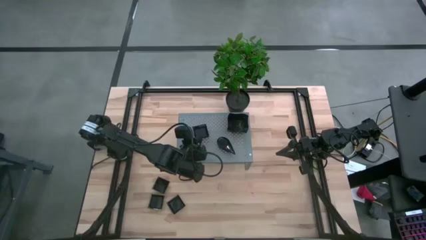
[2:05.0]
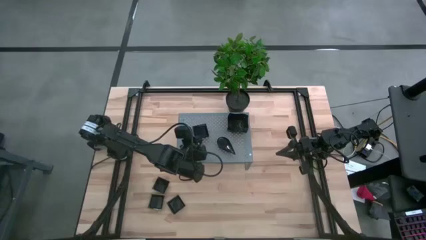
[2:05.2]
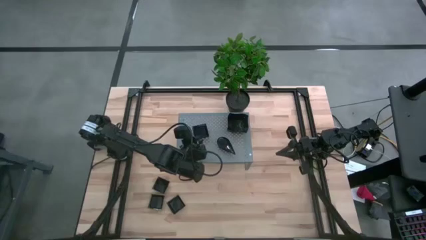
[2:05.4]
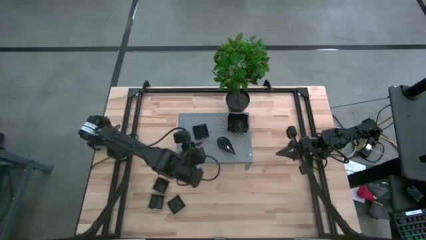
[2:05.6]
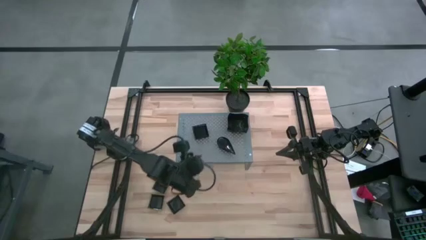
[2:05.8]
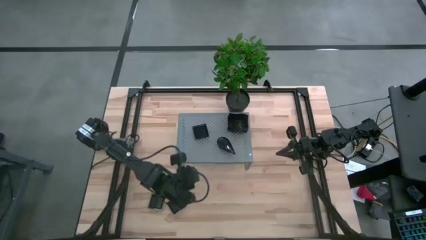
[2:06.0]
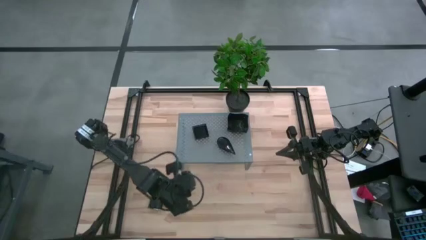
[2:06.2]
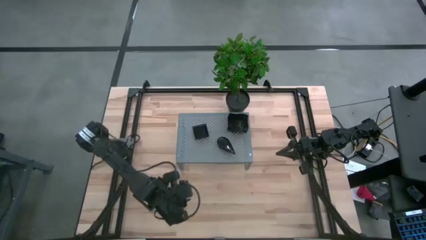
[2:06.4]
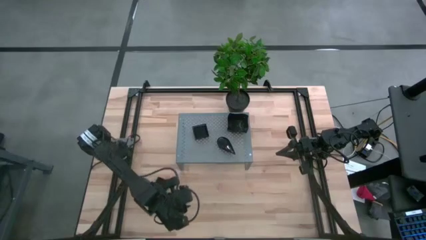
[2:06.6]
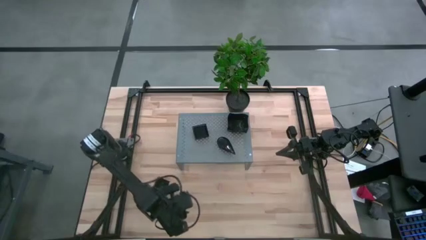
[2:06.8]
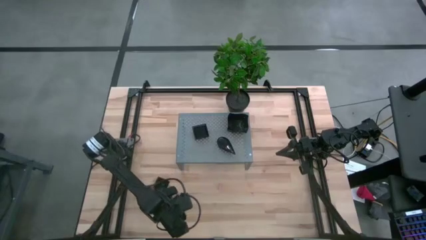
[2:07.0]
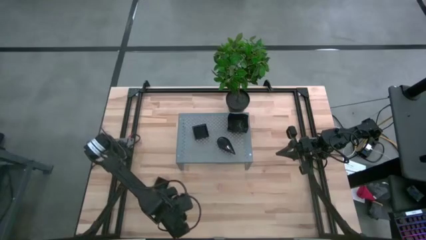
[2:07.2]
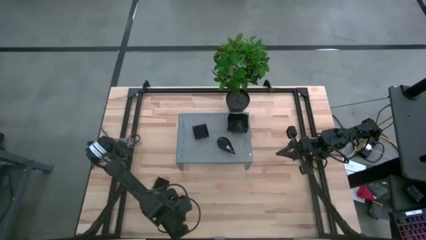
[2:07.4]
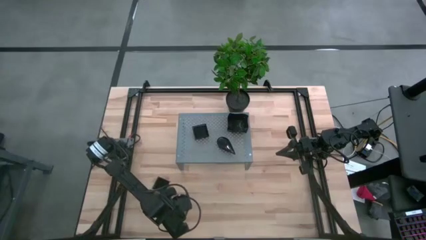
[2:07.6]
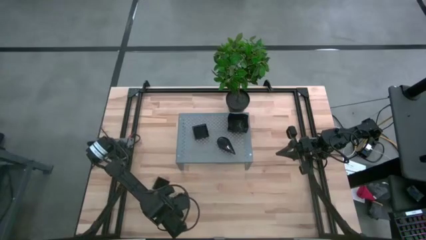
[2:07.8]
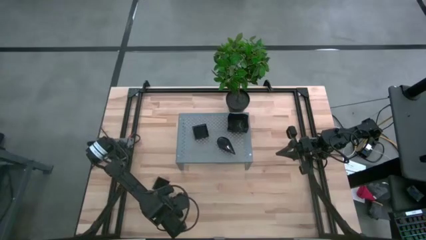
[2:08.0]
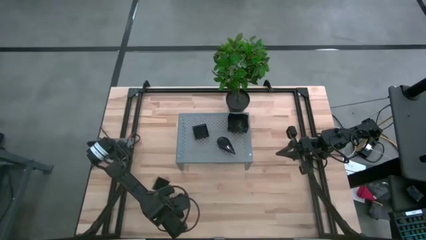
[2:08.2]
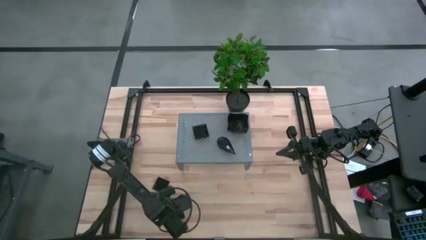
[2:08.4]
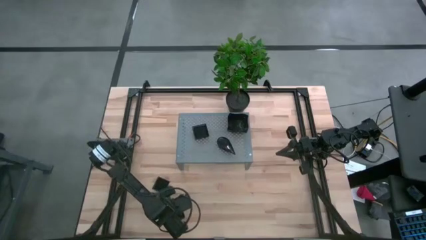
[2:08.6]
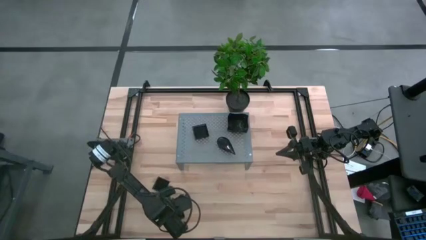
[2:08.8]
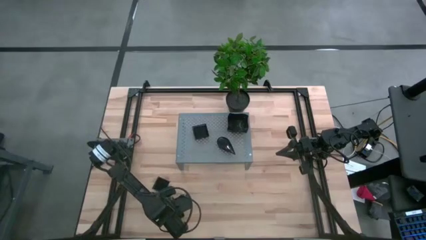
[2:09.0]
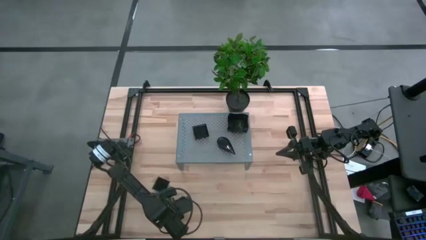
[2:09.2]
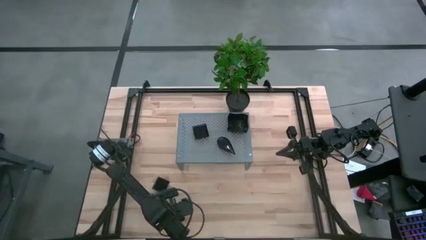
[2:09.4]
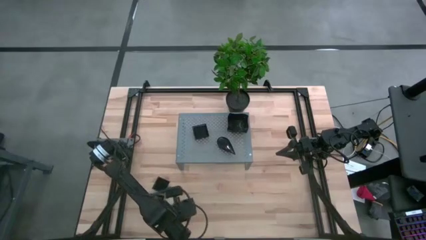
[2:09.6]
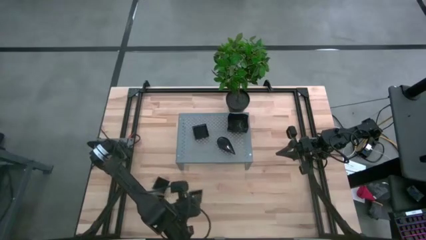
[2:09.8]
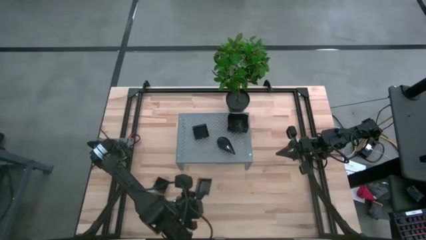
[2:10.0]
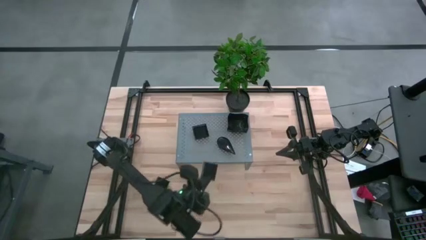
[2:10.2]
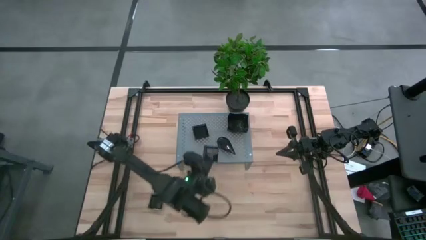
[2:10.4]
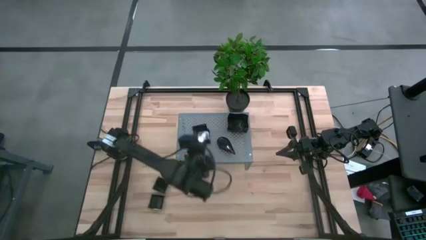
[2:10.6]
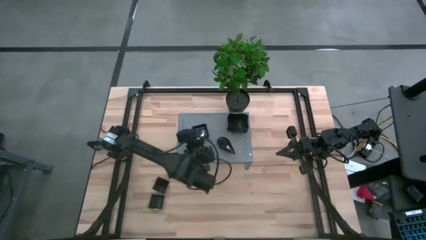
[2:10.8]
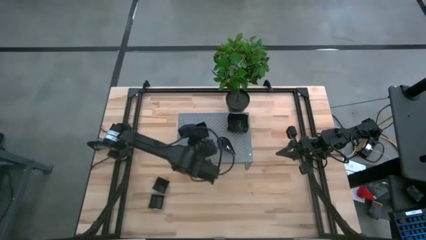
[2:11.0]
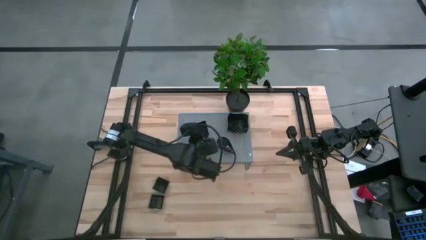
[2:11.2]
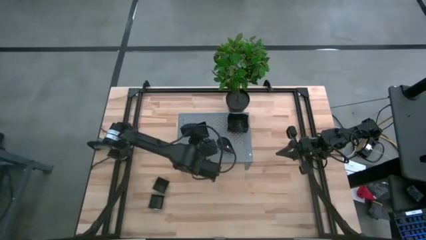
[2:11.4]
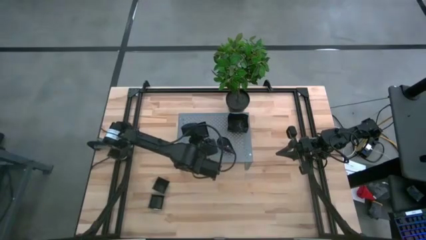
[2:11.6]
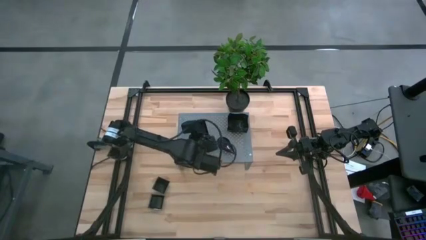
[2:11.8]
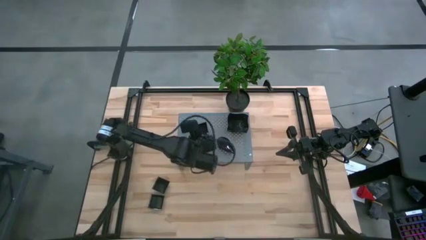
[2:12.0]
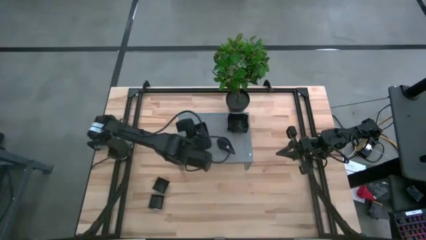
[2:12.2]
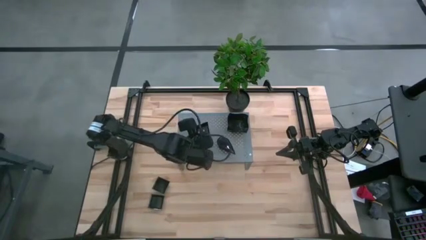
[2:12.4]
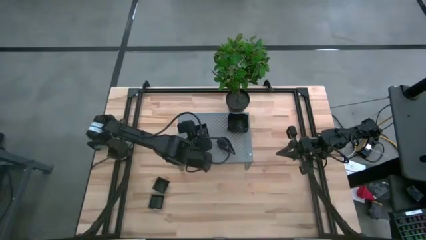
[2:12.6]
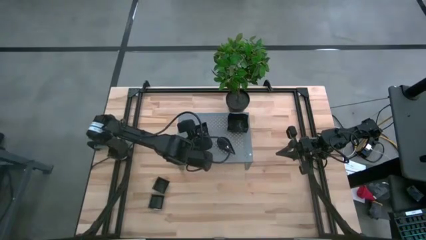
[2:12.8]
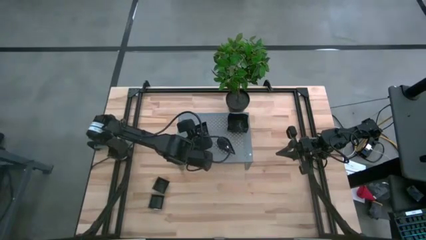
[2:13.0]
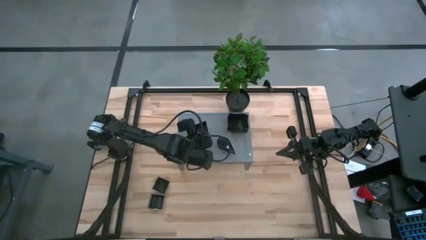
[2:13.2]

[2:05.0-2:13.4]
Task: Pick & Place Mini shaped plates
Stack the black square plate on the black square plates on the shelf

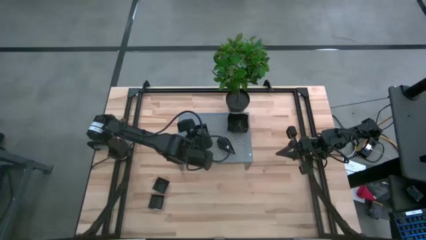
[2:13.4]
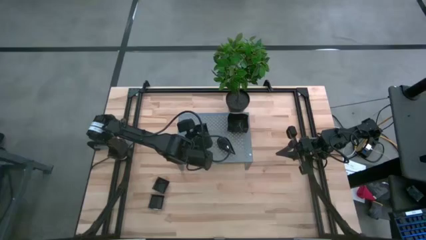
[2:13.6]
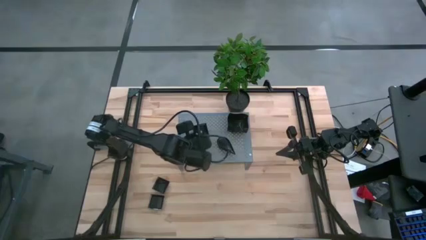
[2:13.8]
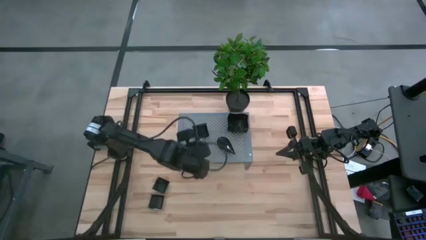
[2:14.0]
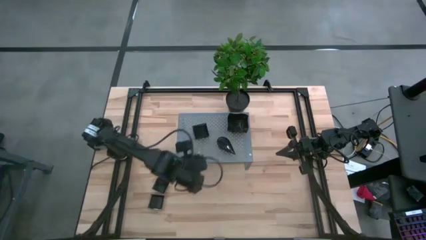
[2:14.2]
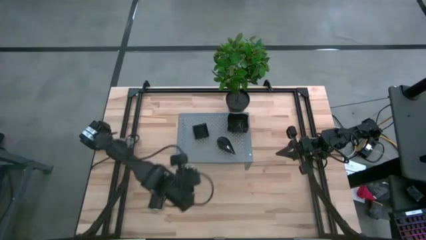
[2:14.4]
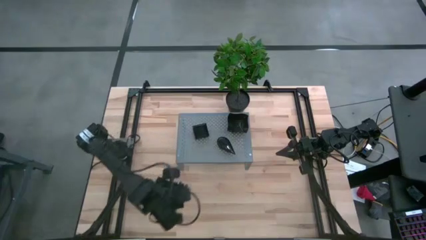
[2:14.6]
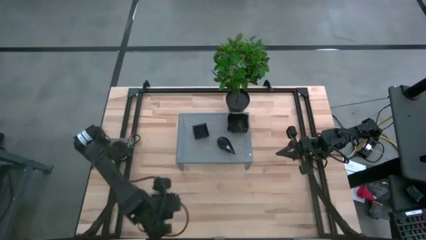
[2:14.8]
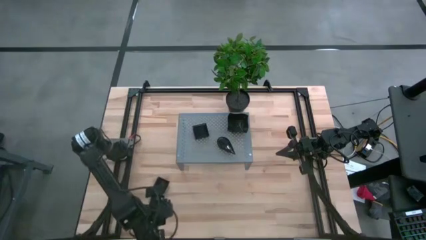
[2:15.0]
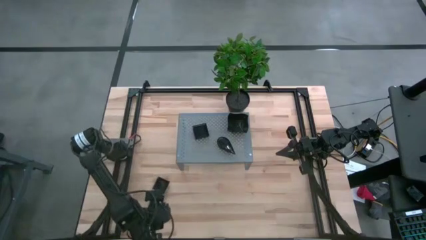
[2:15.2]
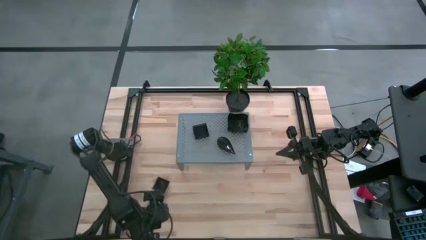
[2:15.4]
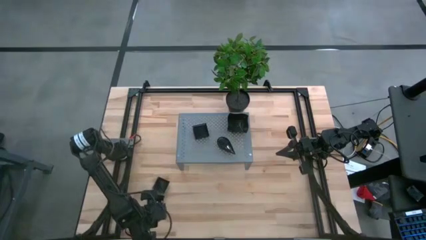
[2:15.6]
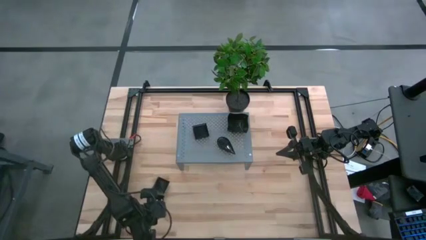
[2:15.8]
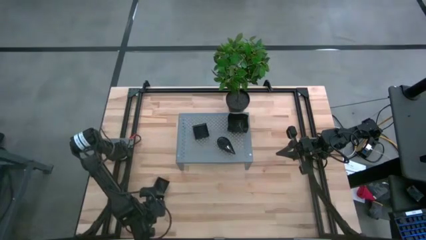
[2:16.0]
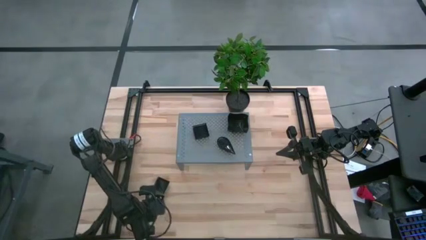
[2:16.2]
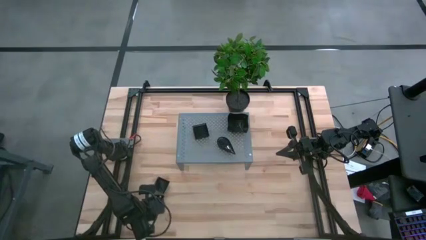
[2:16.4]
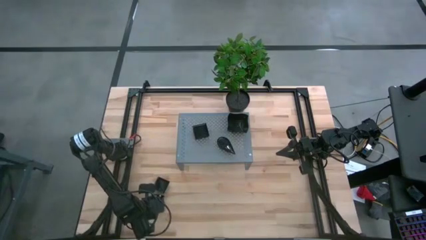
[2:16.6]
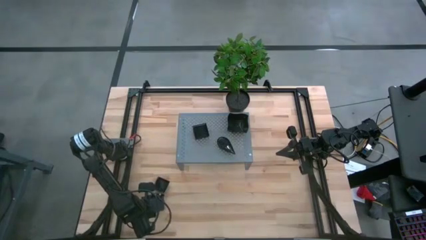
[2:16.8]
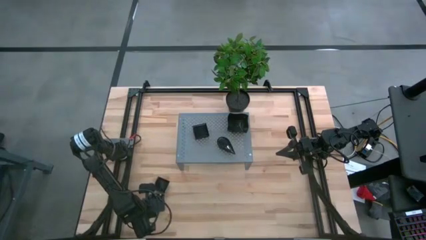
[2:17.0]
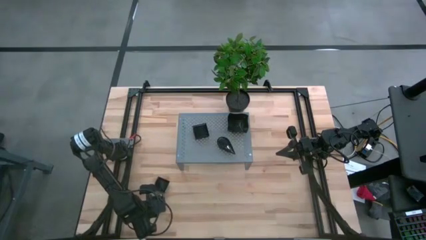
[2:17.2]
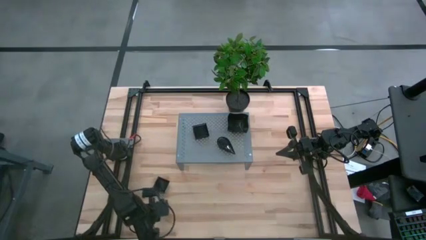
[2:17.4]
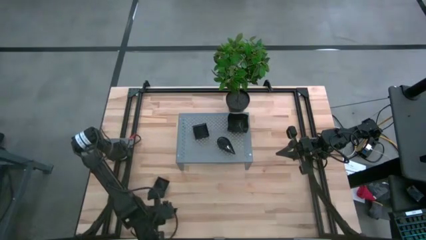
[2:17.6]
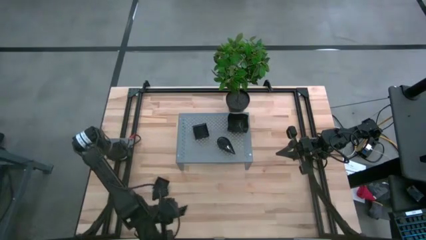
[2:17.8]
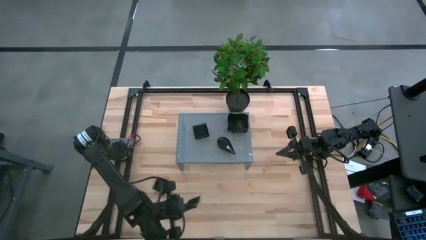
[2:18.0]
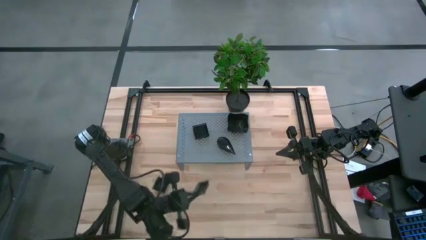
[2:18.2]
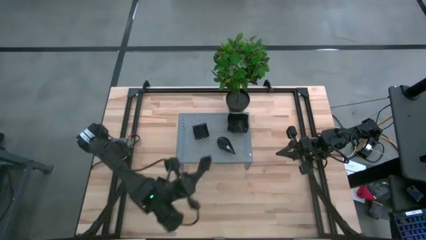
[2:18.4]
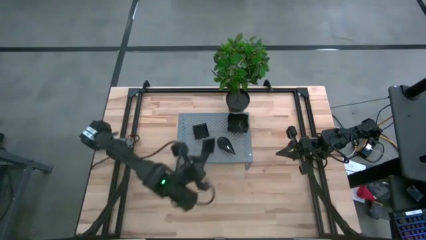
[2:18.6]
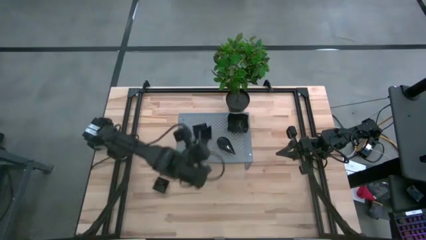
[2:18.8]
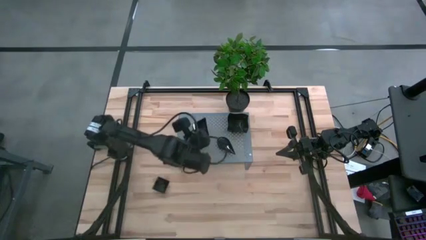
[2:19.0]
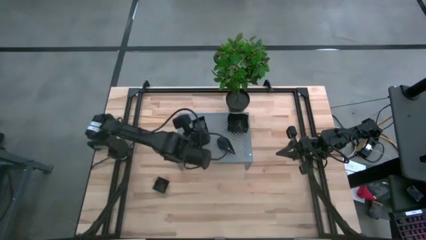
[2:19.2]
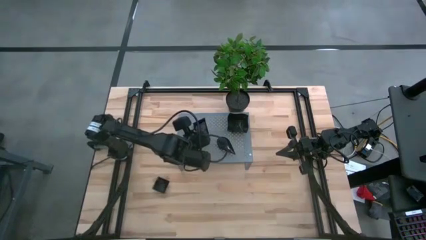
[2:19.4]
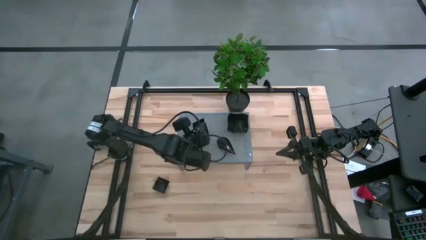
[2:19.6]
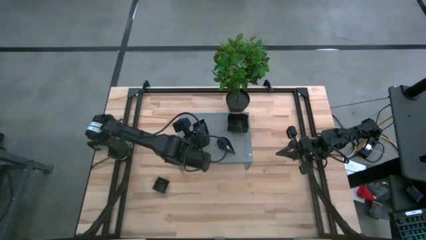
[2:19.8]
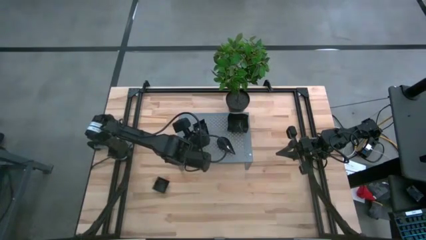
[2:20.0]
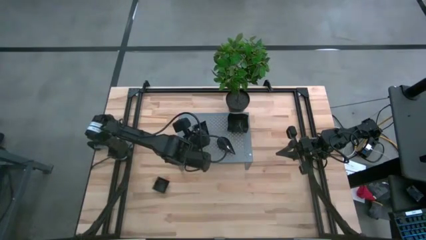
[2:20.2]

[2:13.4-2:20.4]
Stack the black square plate on the black square plates on the shelf
